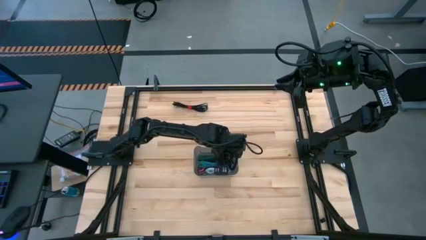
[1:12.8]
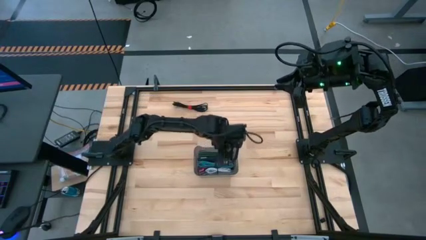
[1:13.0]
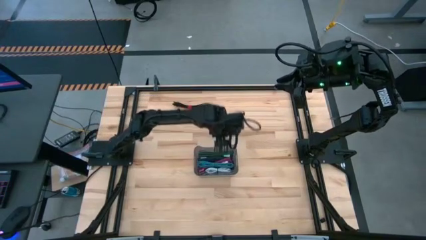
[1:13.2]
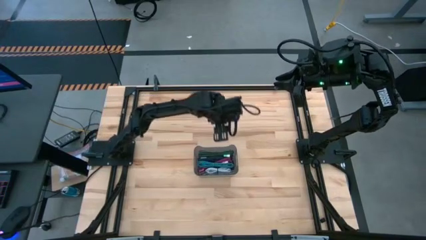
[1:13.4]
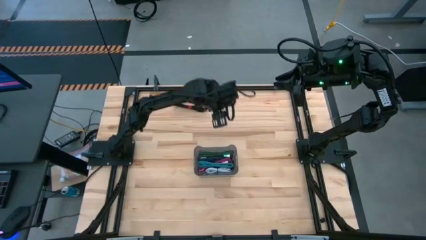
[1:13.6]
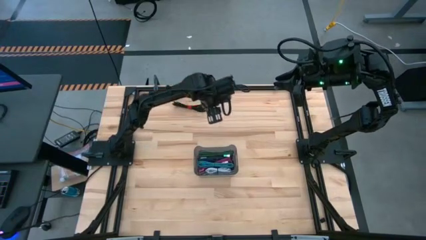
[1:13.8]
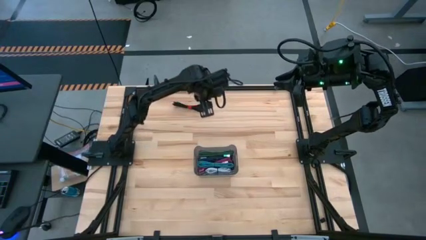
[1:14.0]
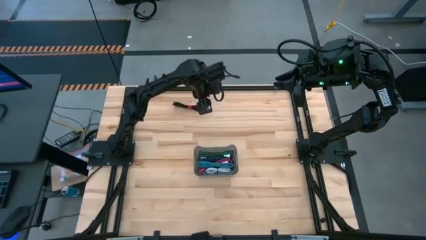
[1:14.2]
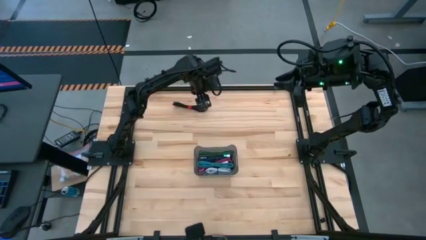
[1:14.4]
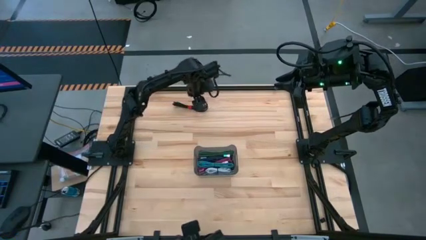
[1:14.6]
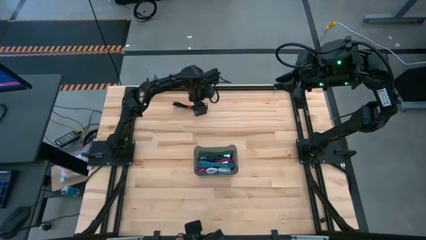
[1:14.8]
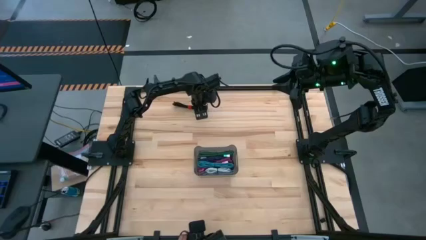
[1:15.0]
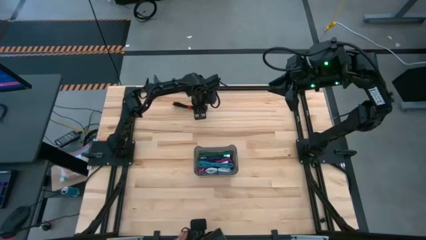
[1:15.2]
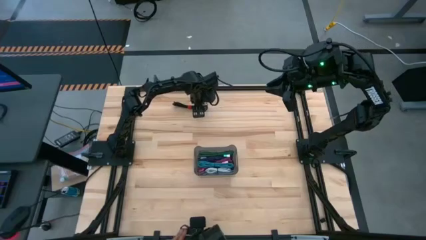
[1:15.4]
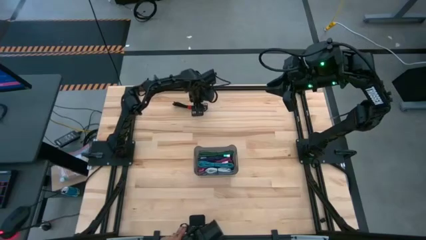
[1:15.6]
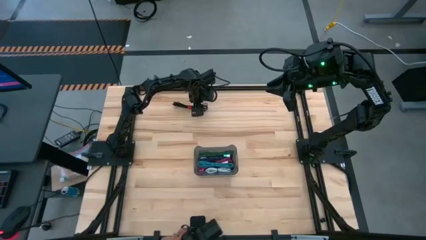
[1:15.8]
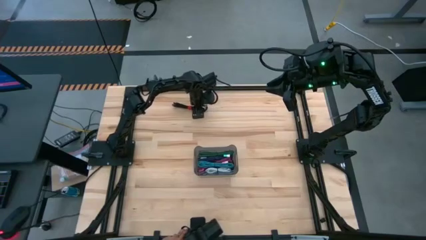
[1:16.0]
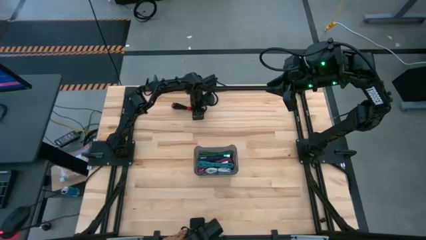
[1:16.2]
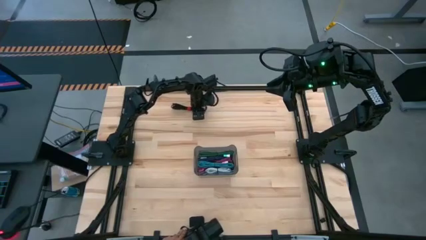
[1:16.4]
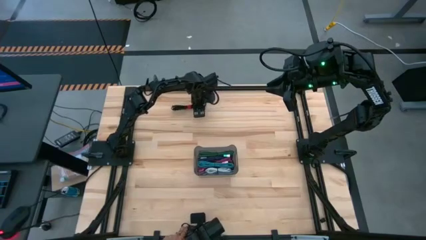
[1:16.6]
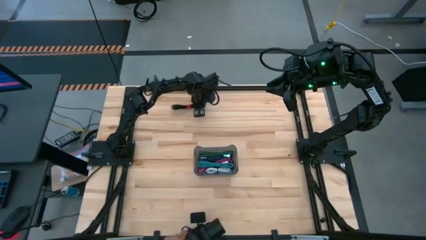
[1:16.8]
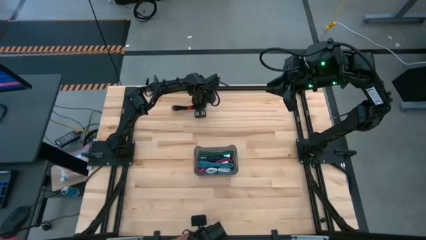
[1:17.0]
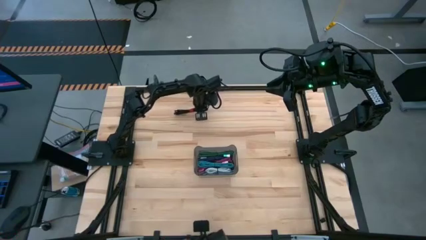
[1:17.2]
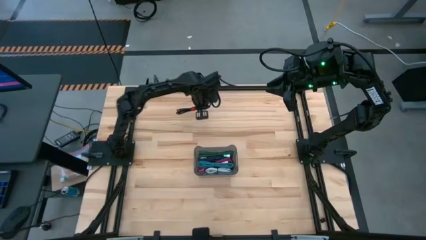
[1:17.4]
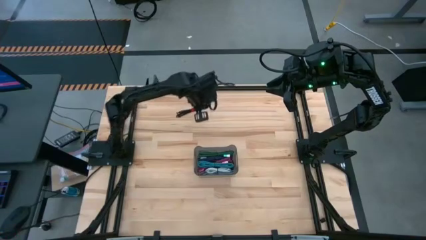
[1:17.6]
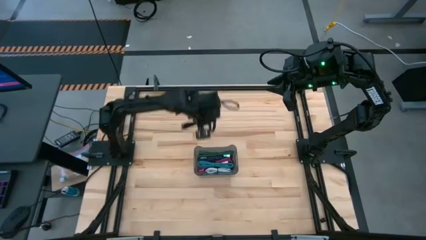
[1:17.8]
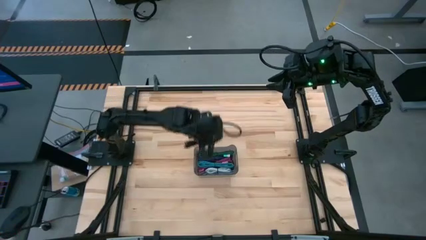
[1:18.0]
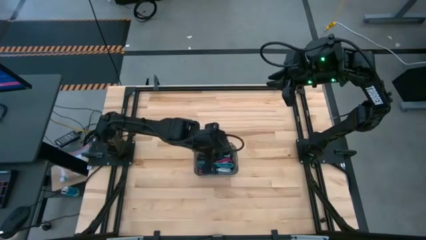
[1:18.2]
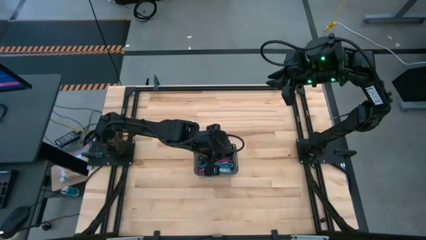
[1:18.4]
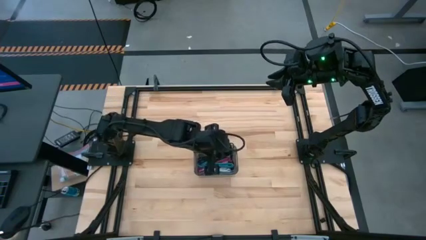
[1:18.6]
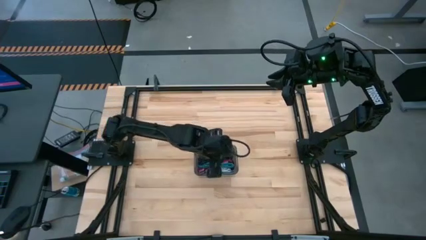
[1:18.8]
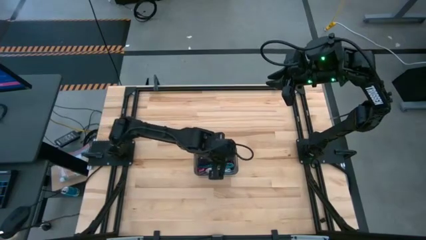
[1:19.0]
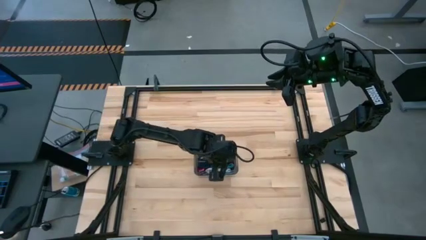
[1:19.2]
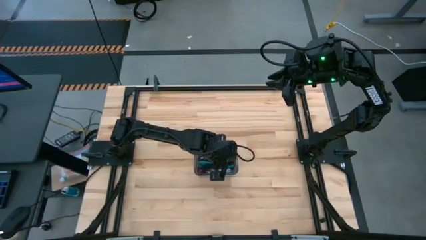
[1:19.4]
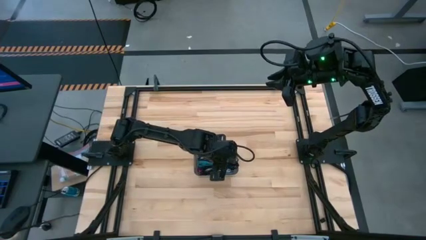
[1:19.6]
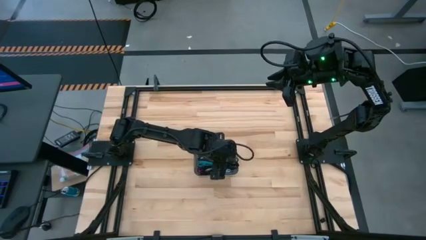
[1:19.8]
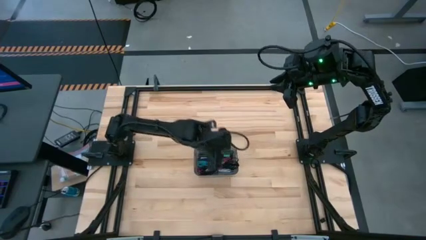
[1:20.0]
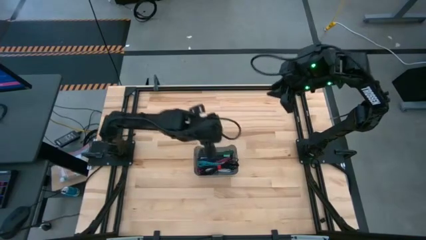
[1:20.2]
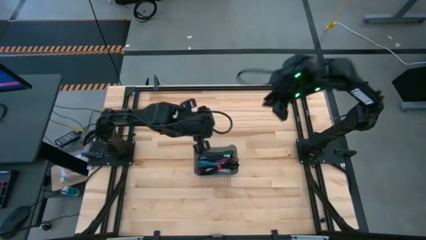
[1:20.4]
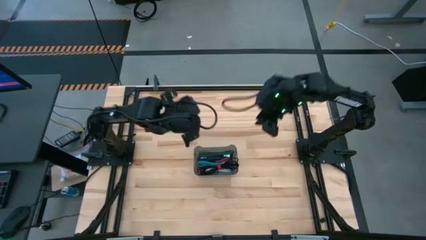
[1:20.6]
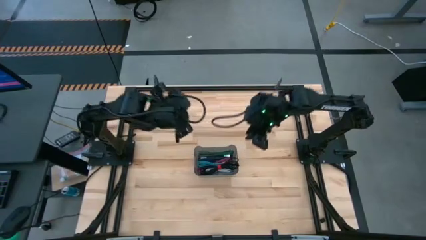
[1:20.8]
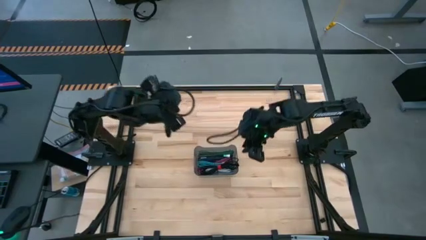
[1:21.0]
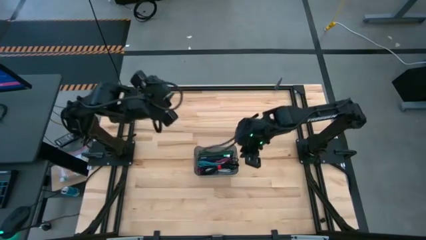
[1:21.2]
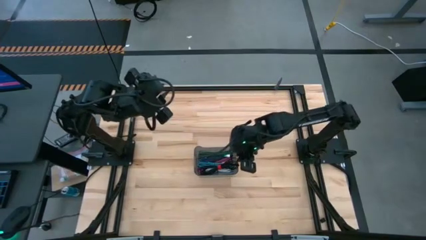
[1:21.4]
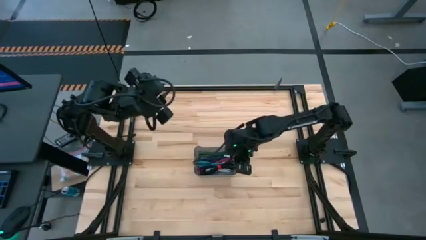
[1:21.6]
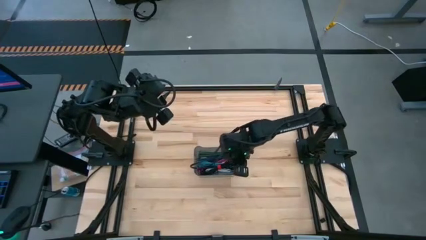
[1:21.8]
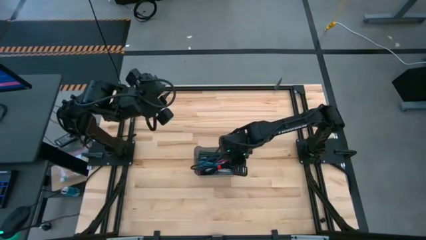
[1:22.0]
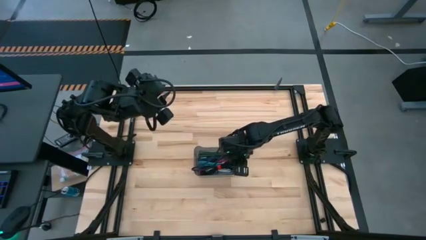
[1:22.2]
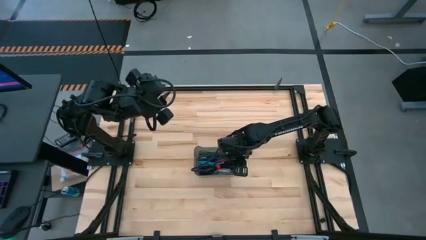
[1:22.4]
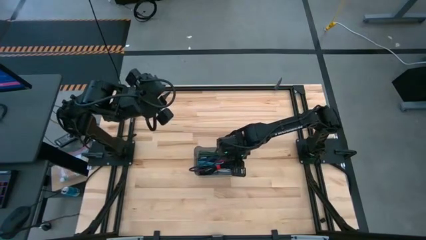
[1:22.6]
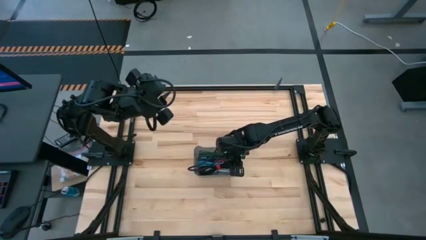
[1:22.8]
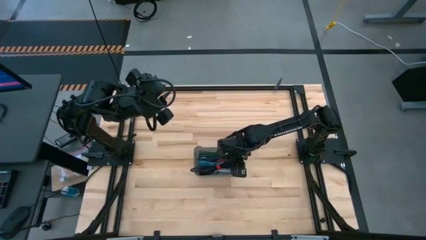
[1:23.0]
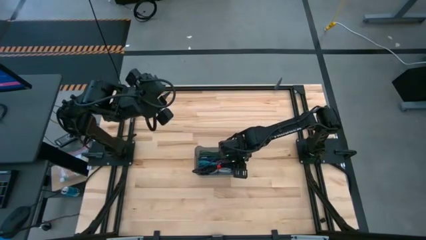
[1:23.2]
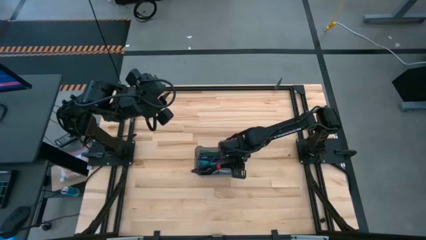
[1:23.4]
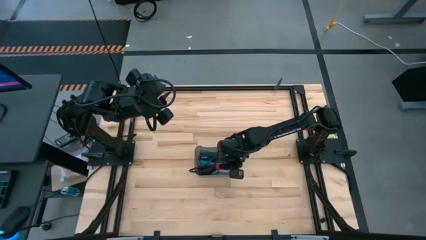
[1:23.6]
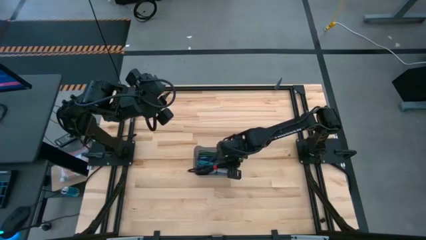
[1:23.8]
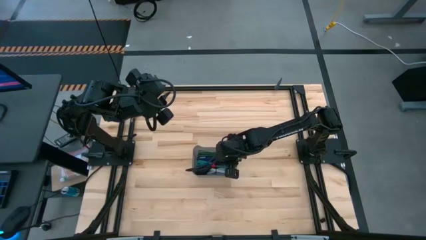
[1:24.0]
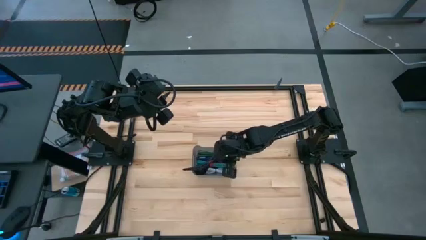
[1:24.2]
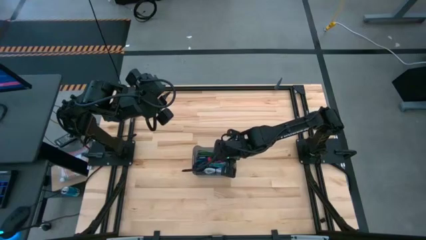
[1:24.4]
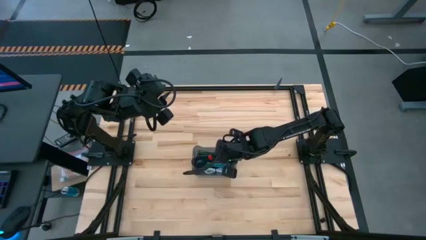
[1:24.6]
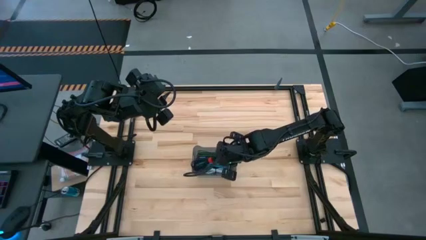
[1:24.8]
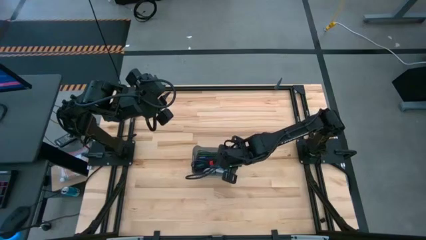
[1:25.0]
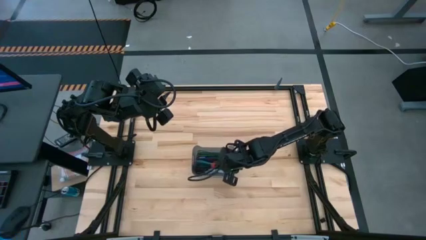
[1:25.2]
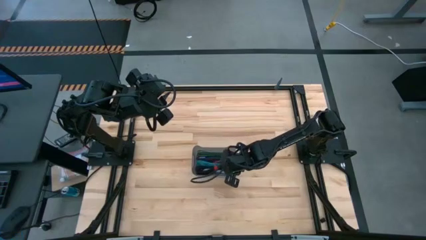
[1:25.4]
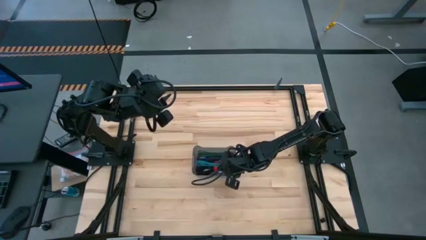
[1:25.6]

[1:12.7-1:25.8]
Task: Pick and place USB-C Cables
Put the black charger cable into the black bin

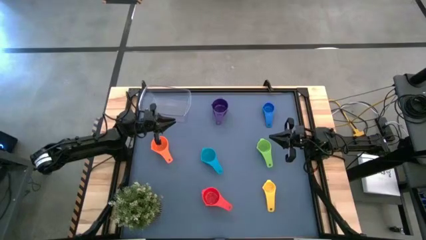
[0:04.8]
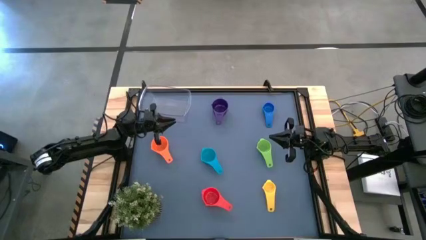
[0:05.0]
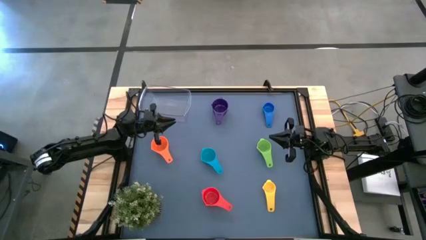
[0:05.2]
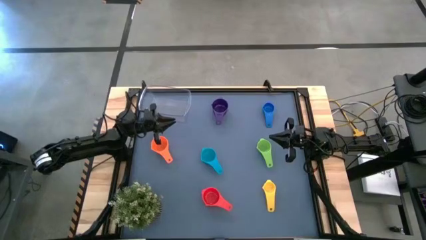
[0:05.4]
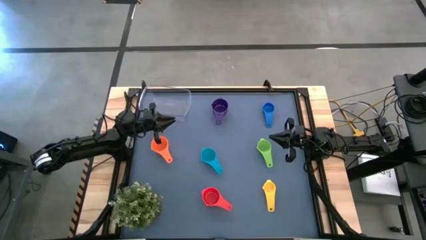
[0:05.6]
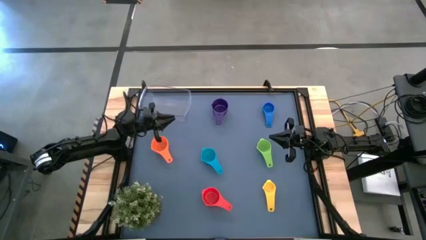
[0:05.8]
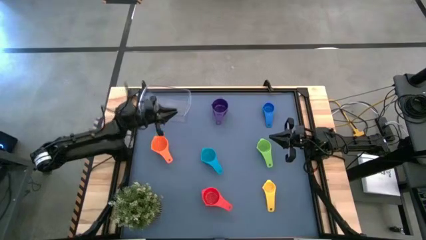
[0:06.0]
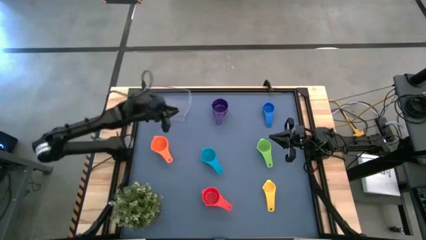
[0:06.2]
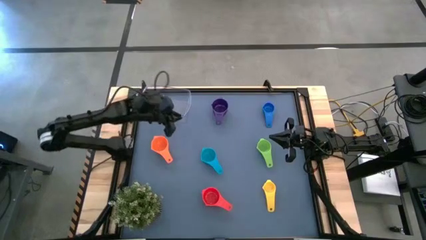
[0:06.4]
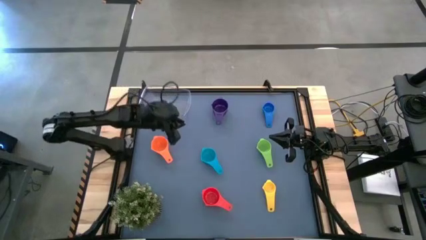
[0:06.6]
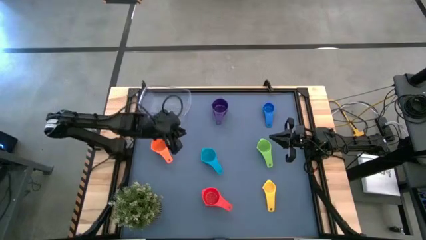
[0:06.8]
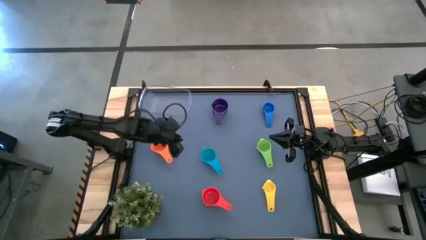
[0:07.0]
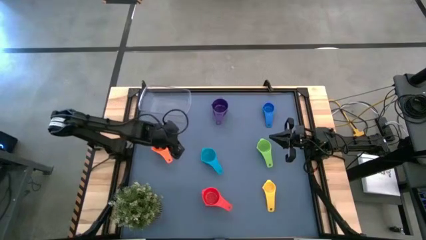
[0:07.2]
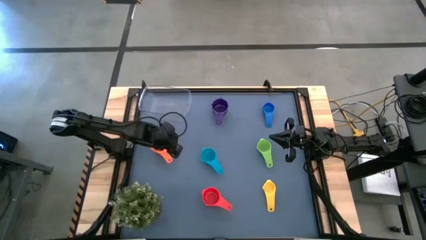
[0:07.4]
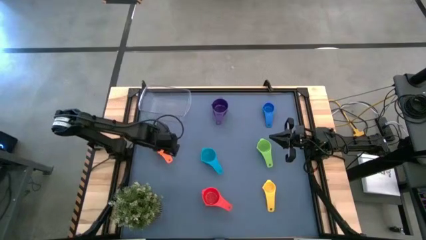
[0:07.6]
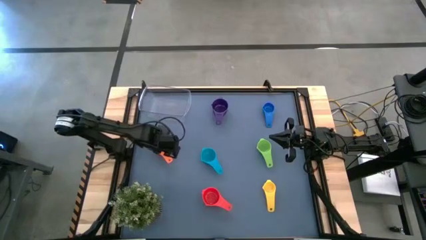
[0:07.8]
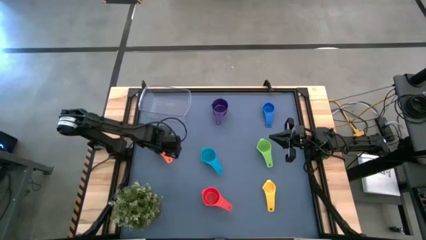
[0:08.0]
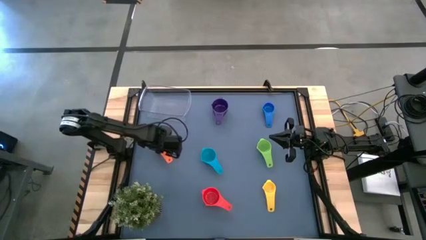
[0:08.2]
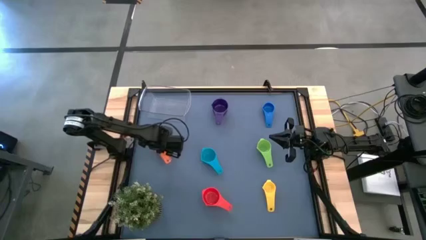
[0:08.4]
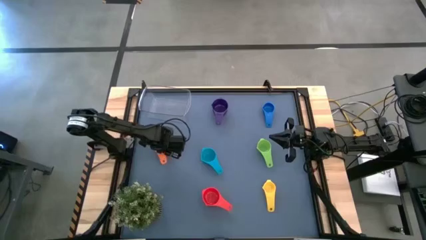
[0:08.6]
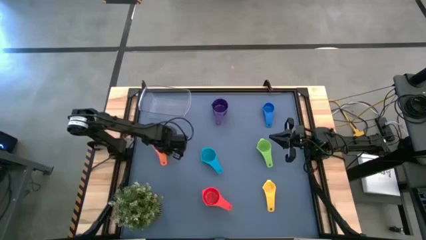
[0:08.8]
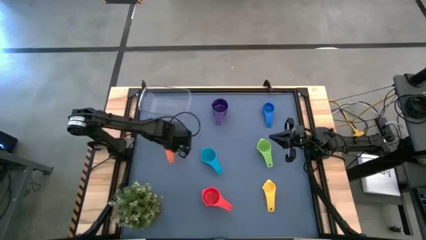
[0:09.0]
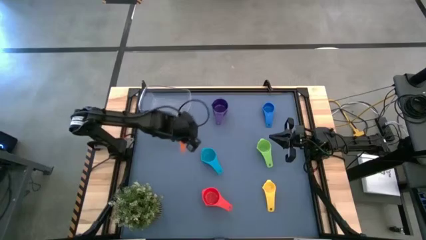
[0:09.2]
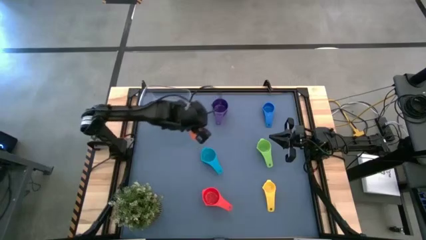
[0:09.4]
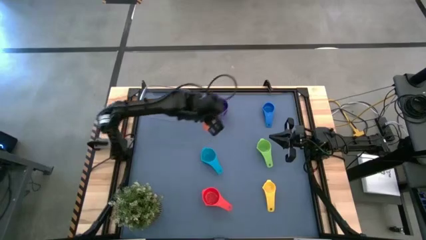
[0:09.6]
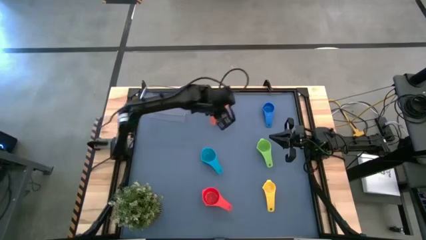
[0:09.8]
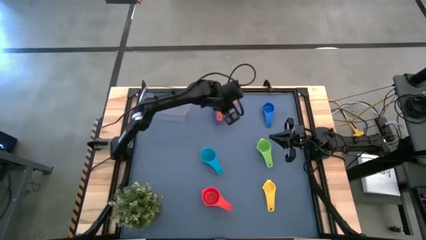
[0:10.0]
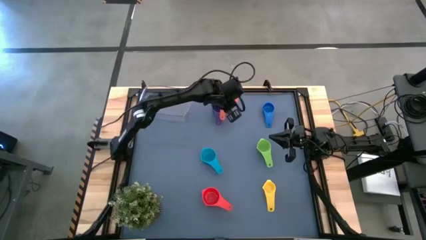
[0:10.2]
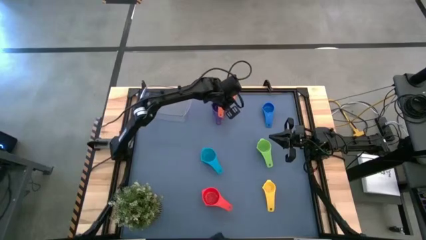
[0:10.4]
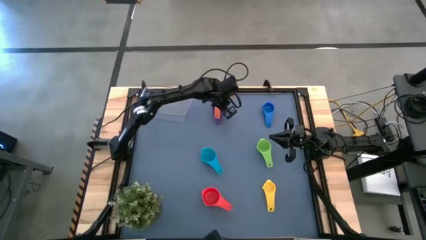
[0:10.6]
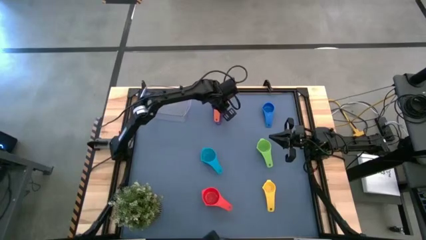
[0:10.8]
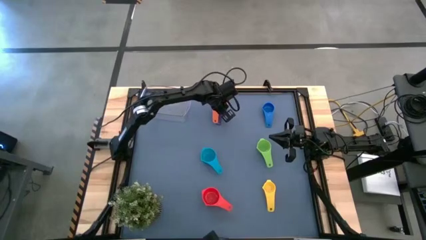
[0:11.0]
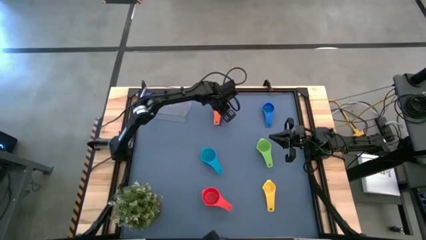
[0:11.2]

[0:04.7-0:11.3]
Task: Nest measuring cups in basket
Stack the orange measuring cup on top of the violet measuring cup
